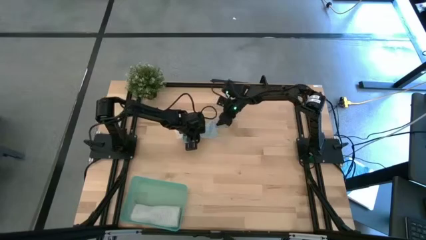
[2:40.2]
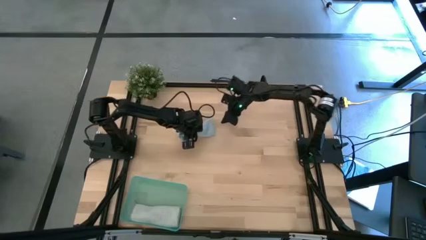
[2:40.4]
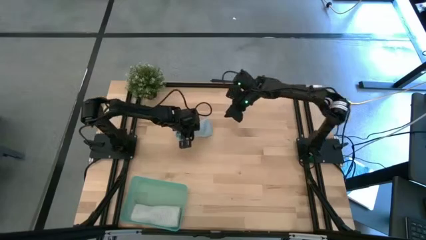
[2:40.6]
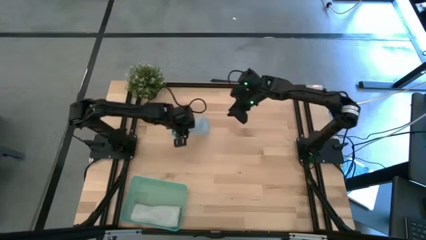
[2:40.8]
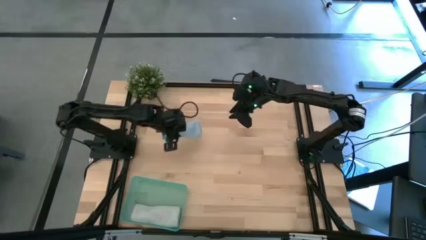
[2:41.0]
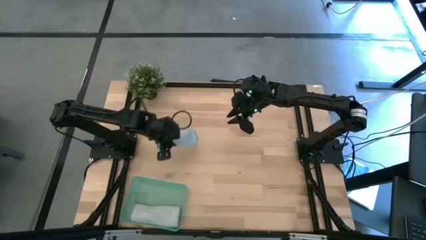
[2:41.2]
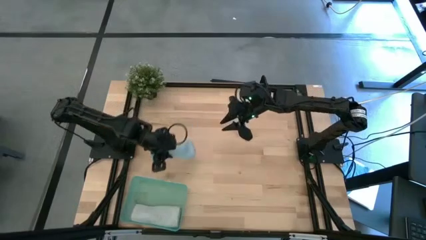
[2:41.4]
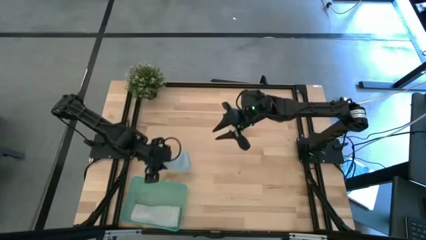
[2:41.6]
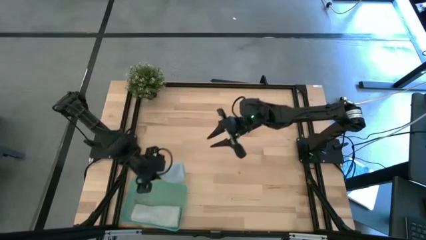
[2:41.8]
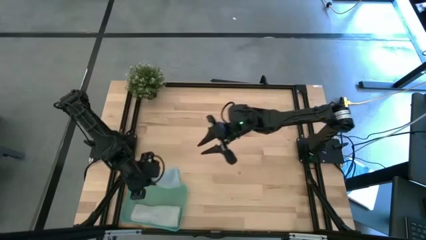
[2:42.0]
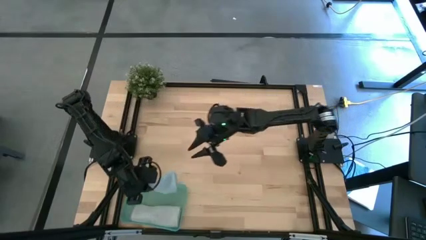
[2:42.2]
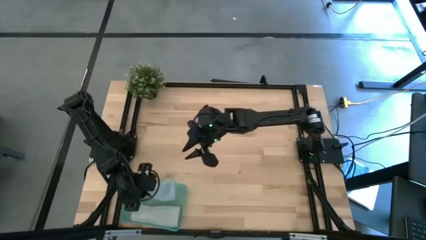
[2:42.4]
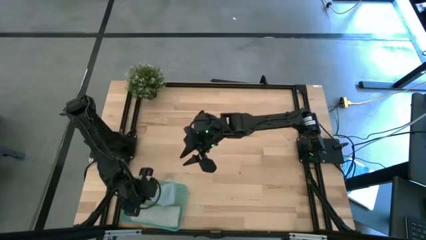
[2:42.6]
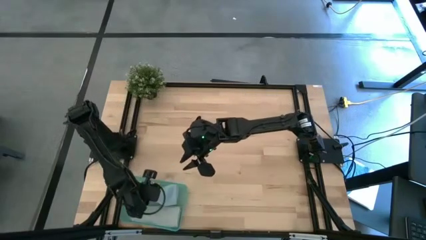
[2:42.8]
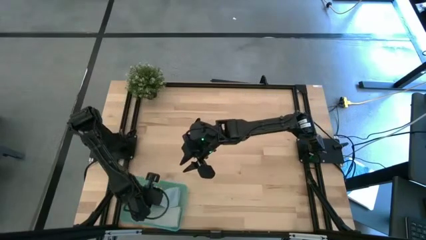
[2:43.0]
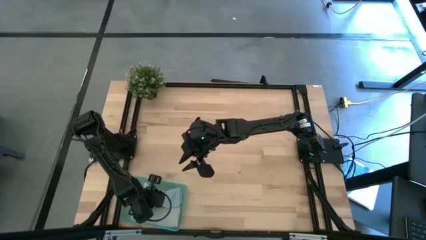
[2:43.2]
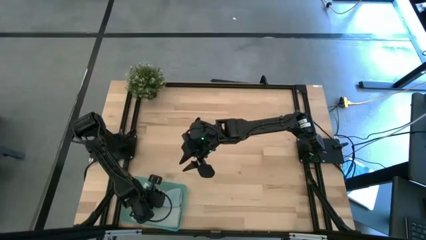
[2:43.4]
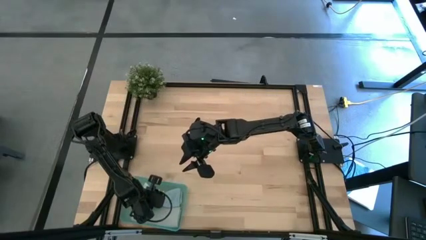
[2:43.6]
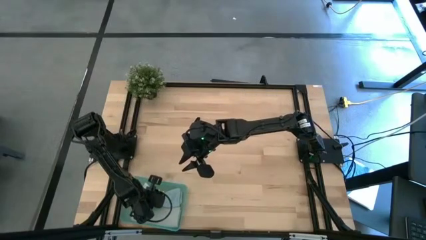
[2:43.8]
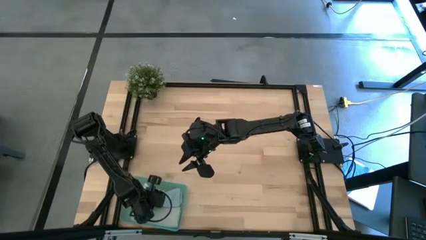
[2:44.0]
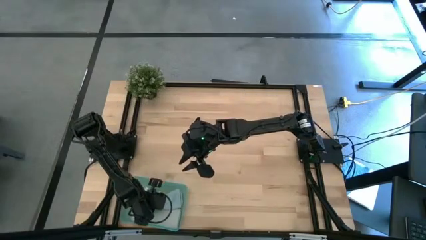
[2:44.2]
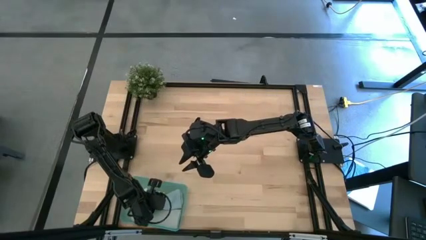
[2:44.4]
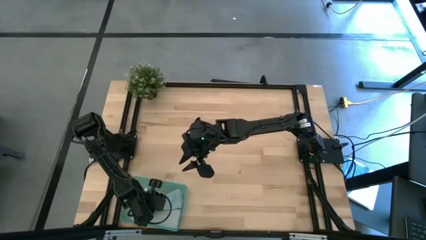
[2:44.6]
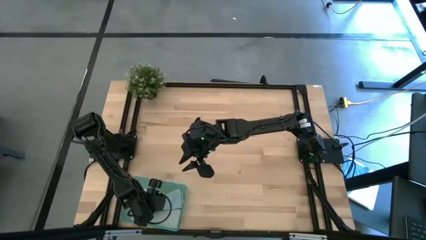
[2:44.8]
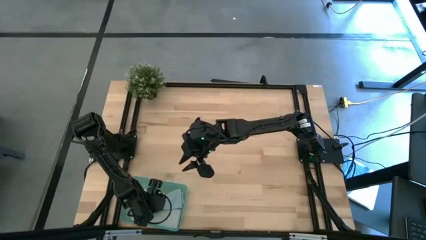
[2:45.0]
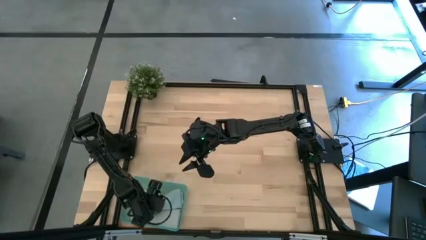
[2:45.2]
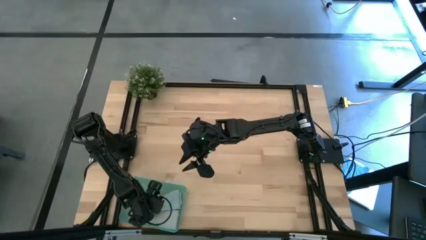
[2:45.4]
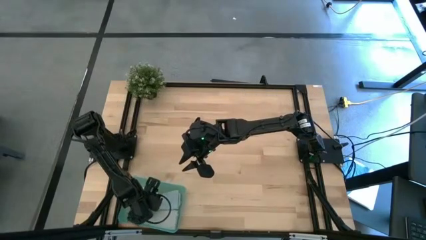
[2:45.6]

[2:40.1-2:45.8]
Task: Roll microfiber towels into tight, uniform cylinder then place into a basket
Put the blue rolled microfiber cloth into the green bin

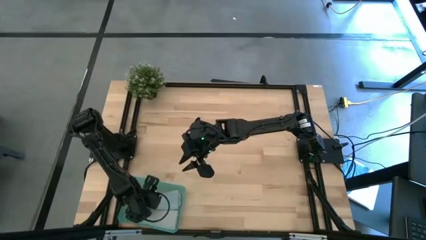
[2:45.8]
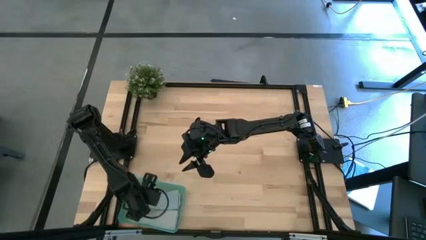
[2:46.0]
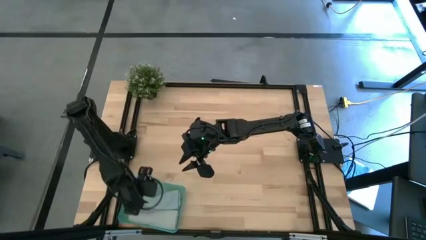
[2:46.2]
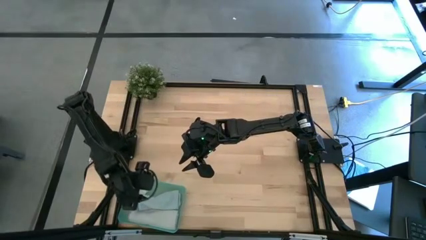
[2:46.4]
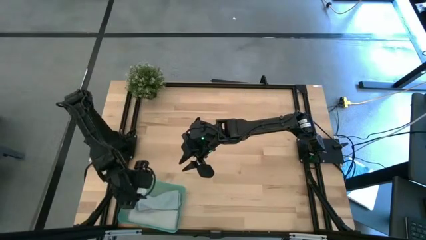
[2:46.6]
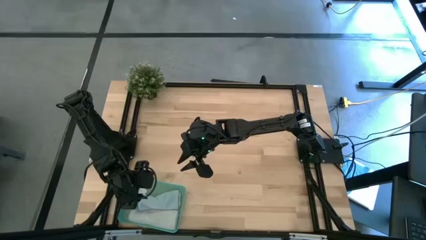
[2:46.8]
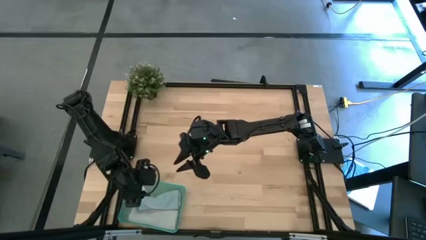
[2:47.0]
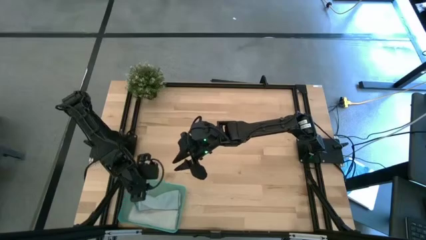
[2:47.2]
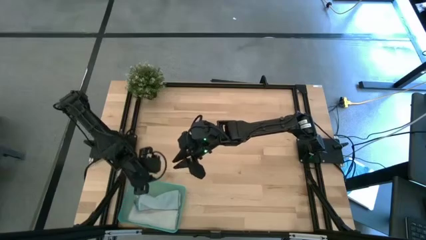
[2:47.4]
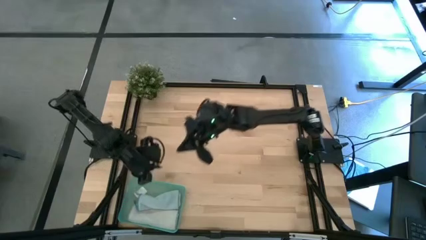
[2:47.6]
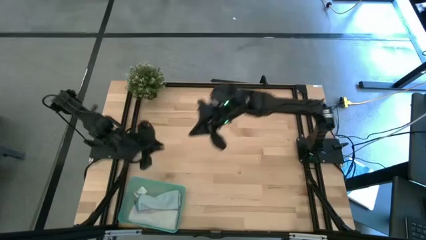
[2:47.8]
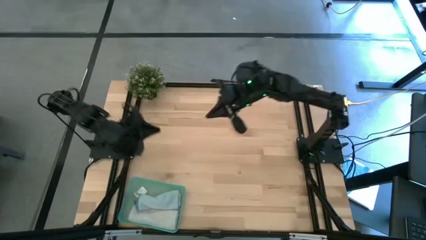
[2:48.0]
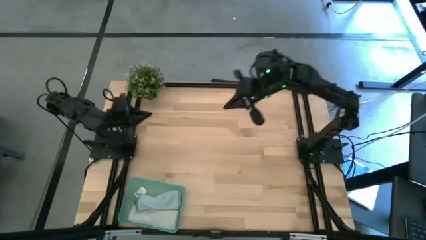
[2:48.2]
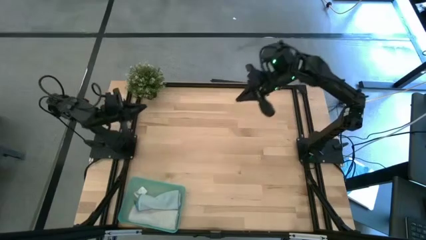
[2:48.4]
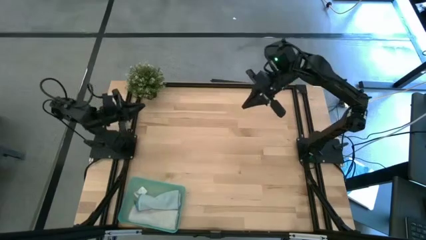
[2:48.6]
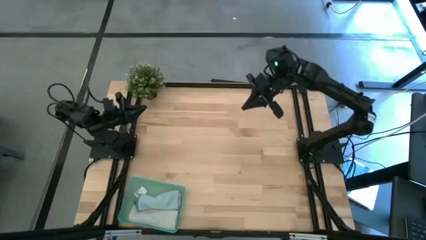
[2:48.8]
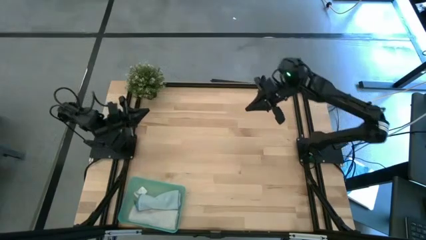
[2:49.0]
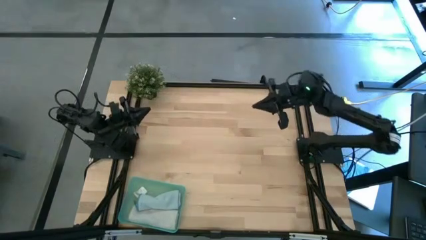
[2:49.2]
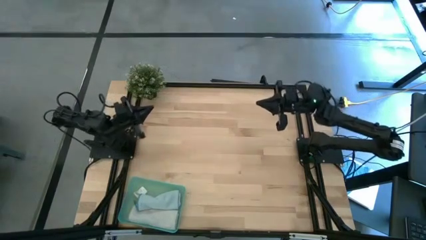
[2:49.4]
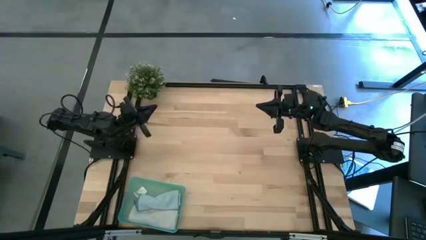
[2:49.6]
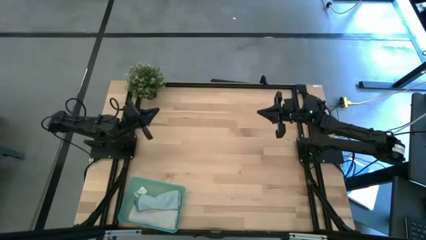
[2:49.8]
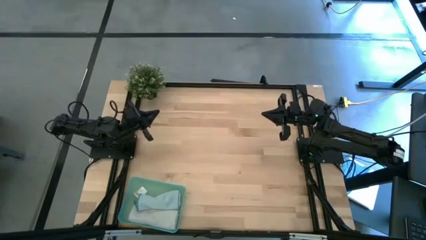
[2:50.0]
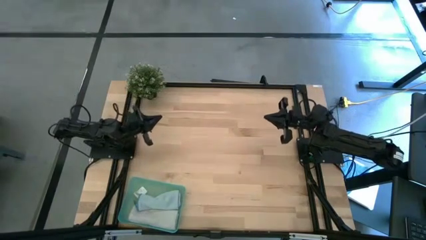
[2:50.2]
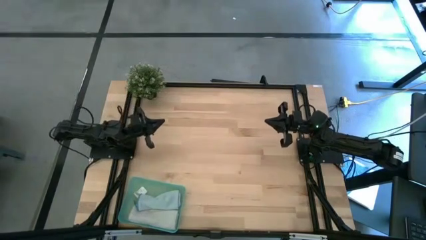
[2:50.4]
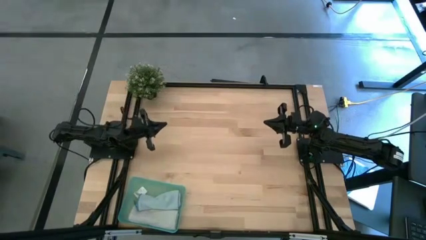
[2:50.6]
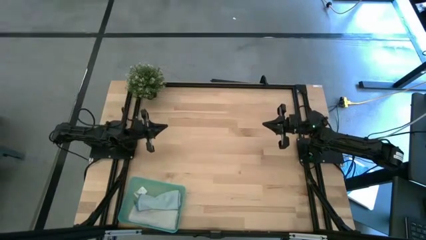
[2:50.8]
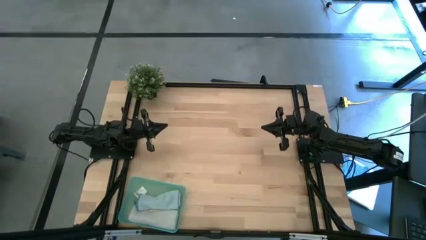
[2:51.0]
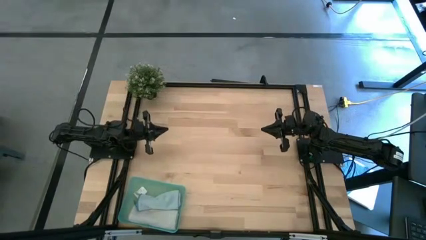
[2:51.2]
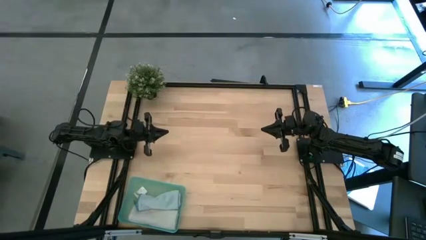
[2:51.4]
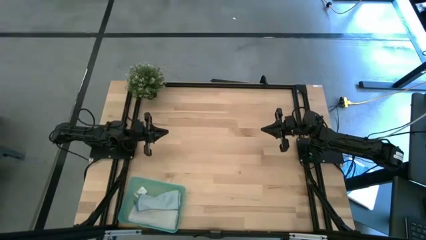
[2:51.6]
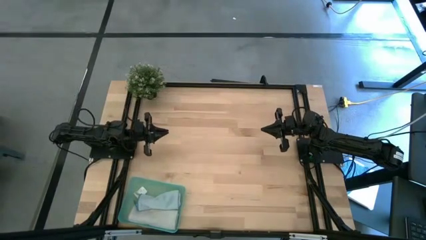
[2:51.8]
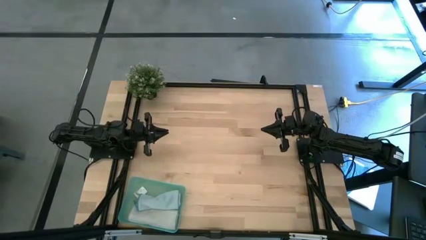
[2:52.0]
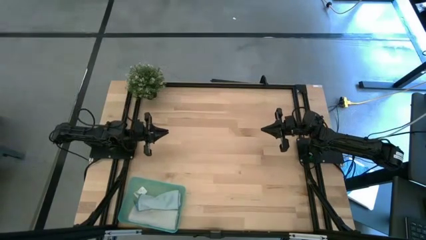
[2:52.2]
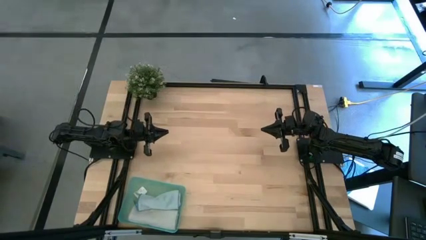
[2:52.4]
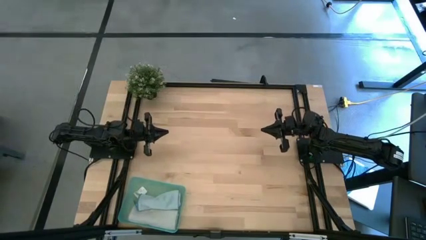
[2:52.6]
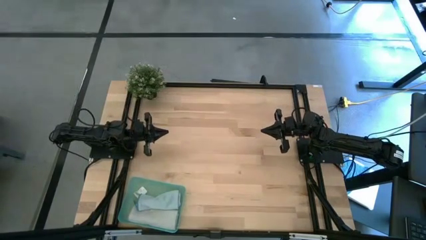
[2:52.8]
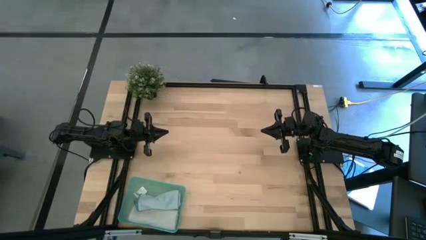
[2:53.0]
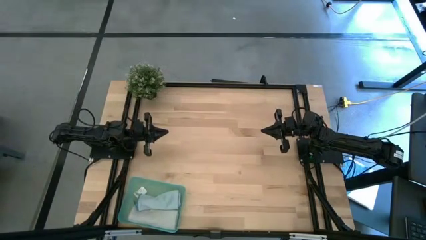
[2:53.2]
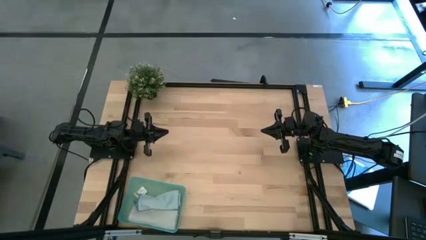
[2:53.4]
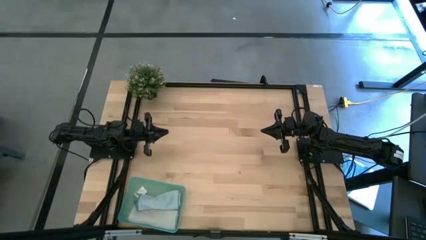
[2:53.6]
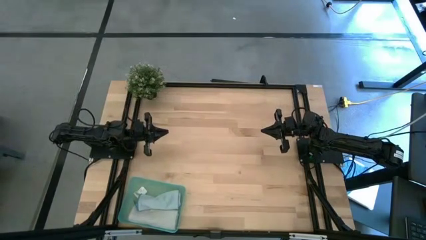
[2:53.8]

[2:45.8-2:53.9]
Return to Home Position
